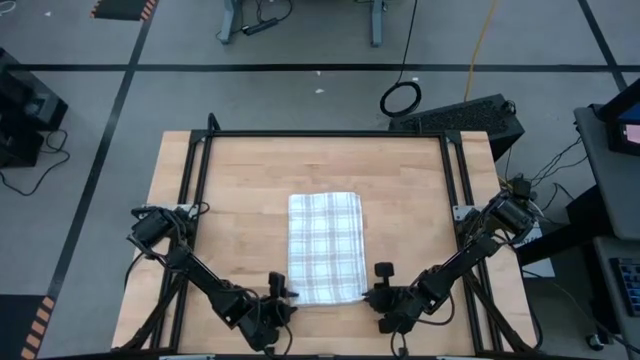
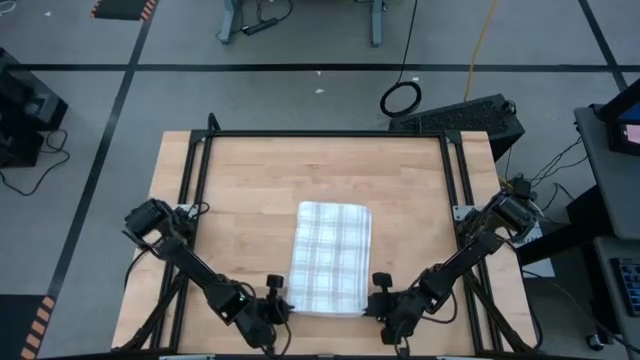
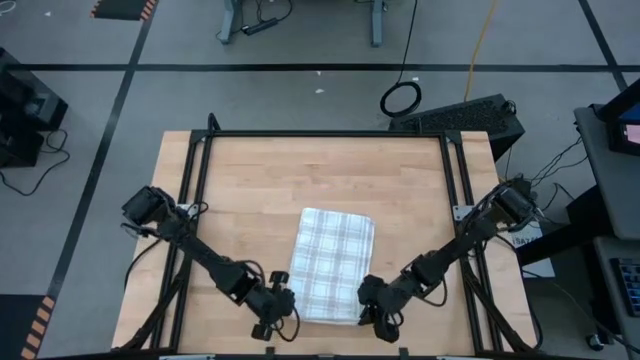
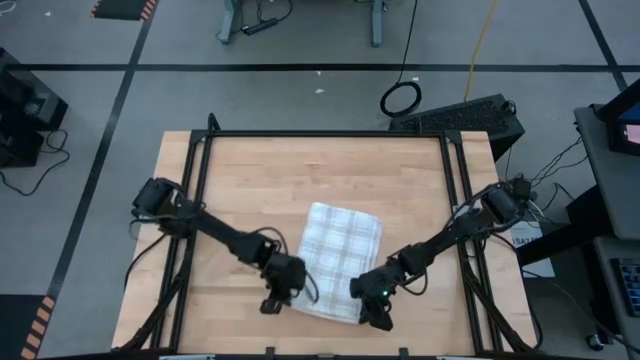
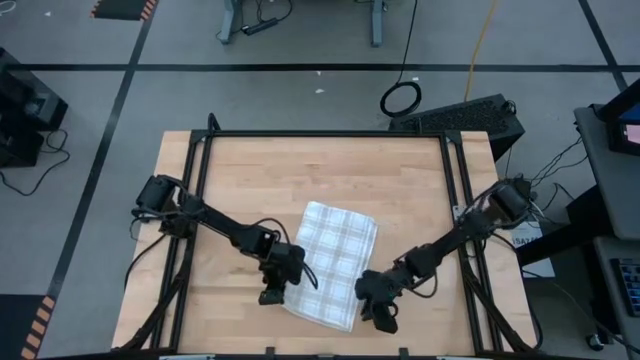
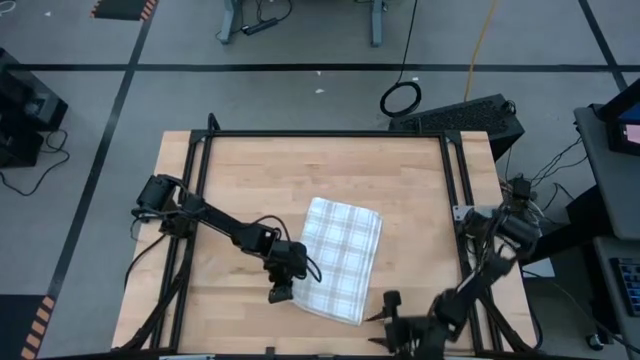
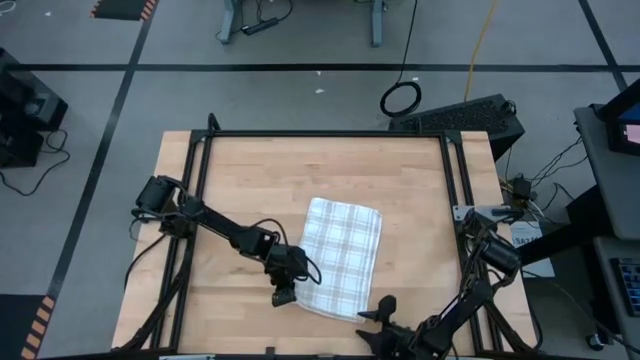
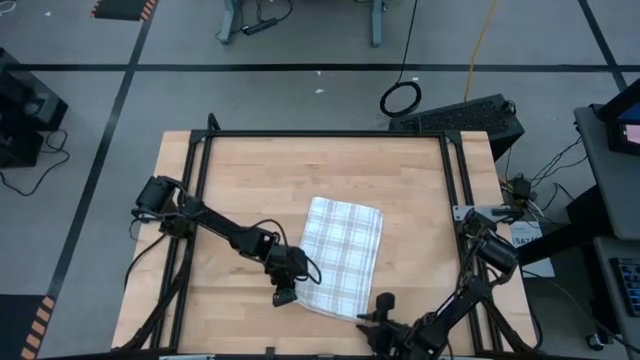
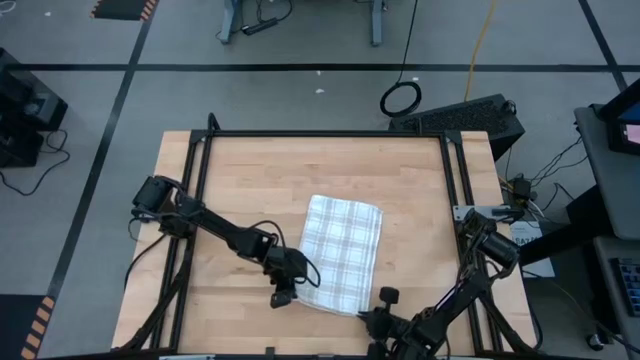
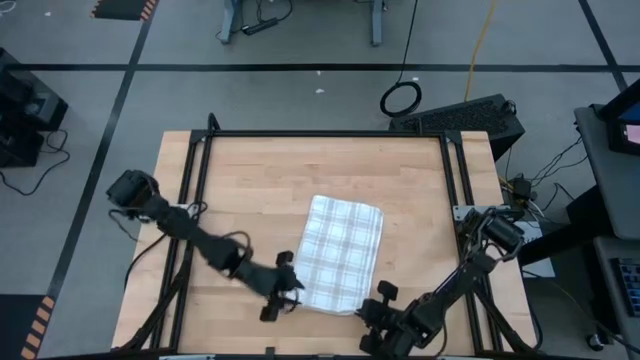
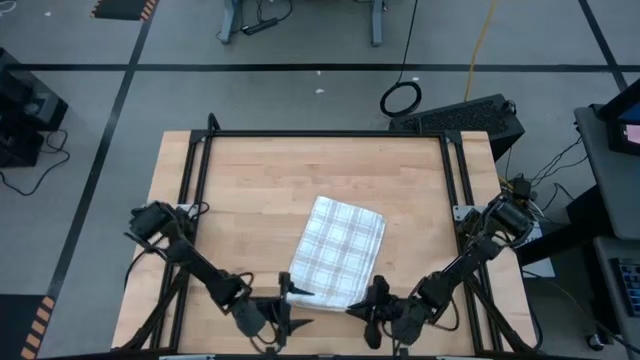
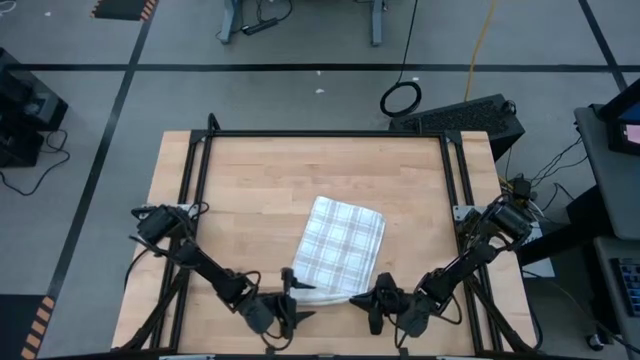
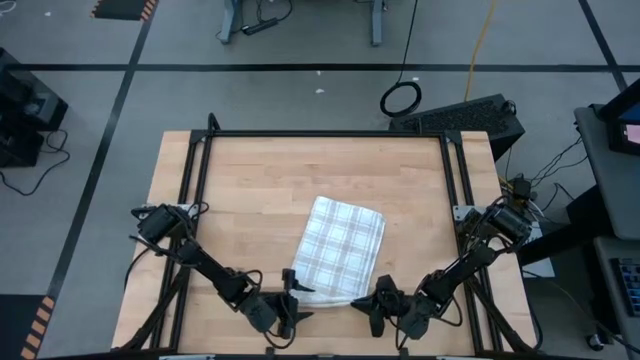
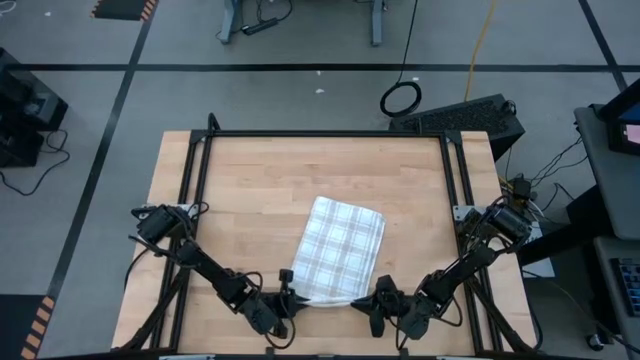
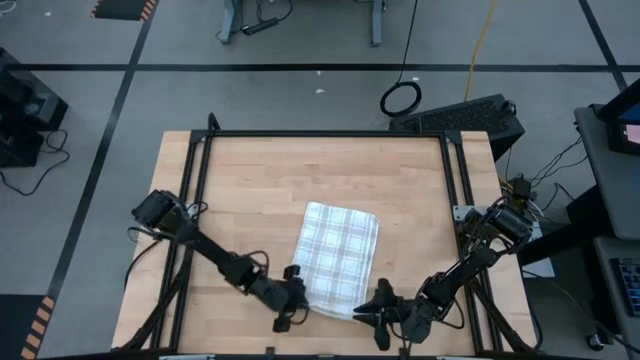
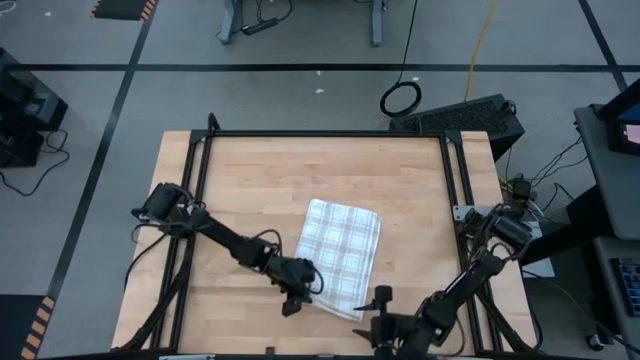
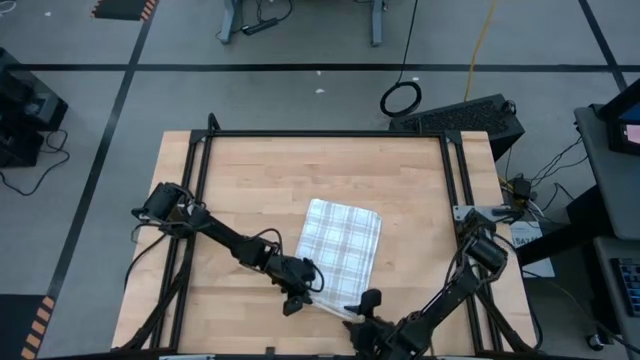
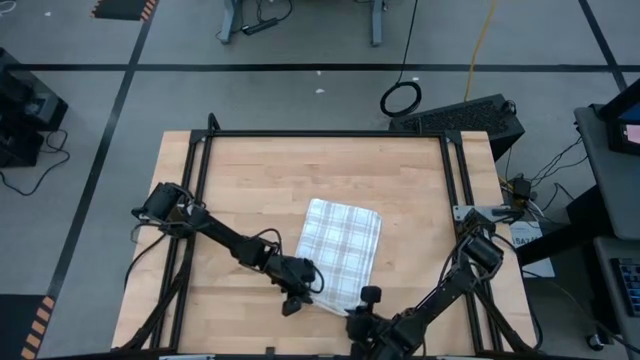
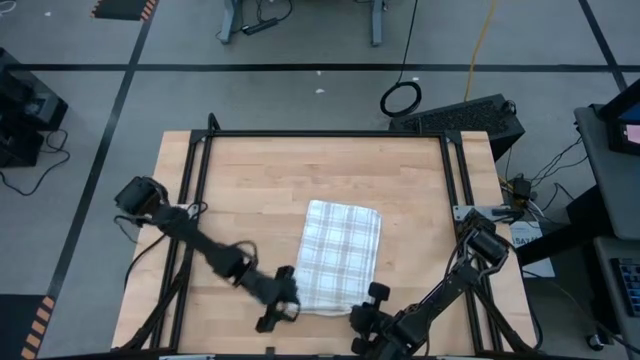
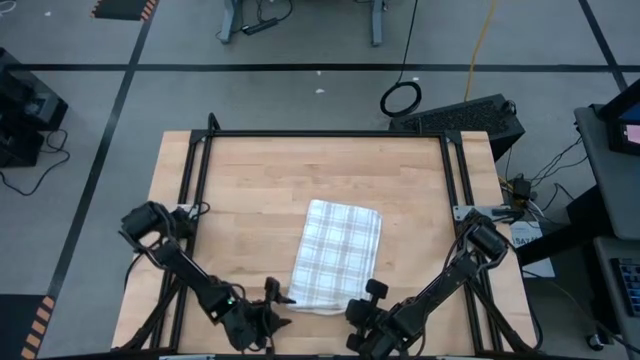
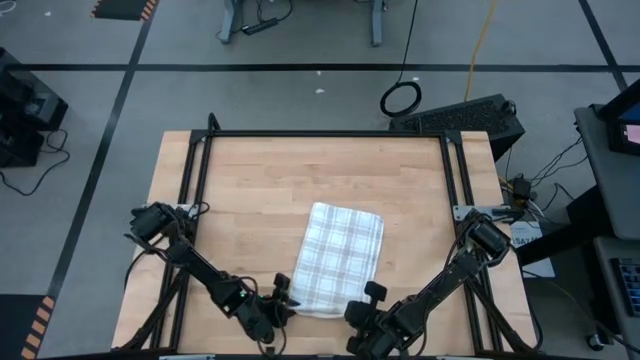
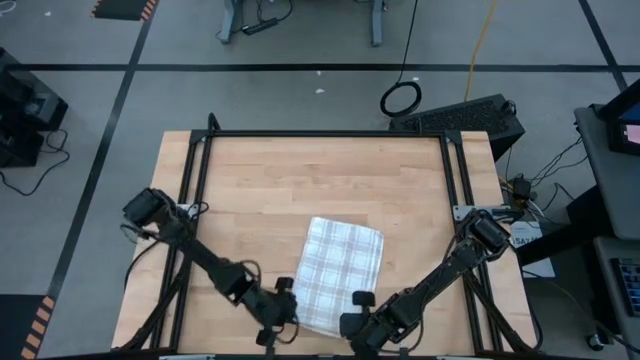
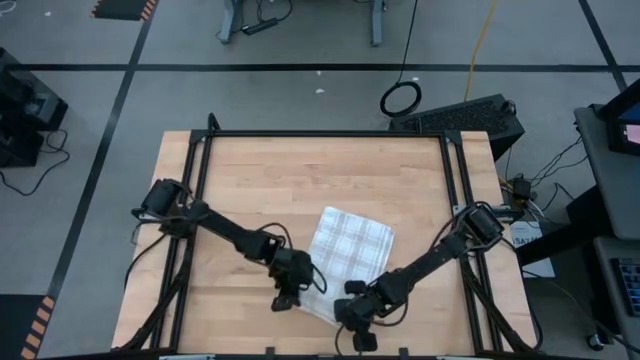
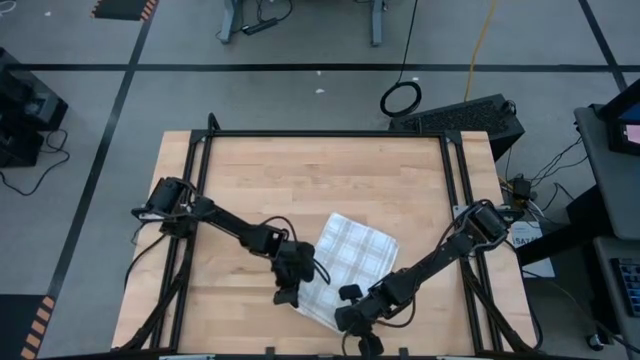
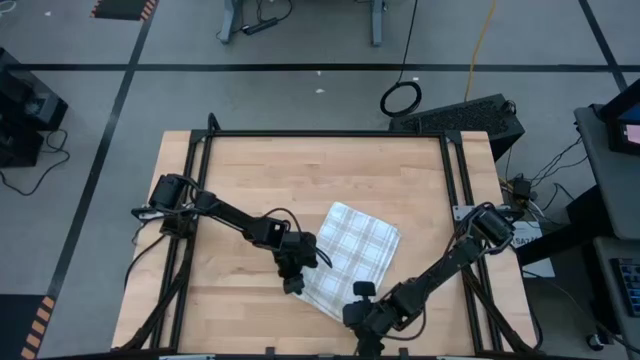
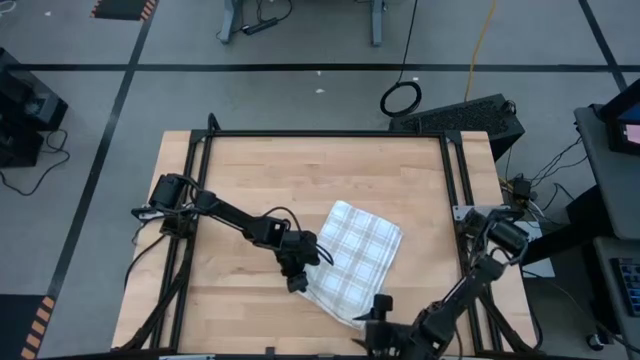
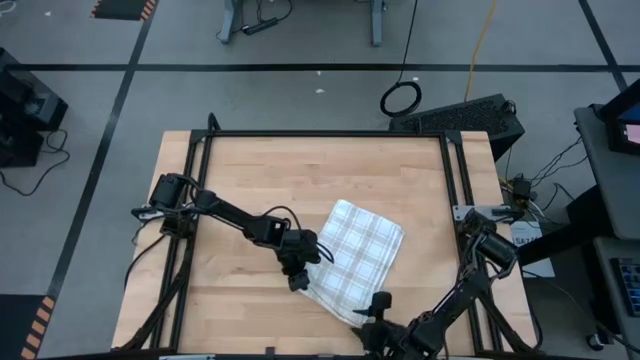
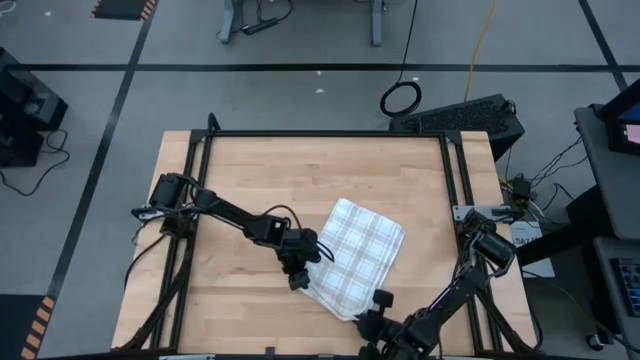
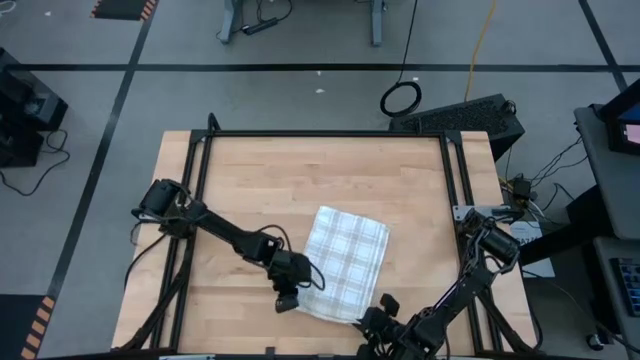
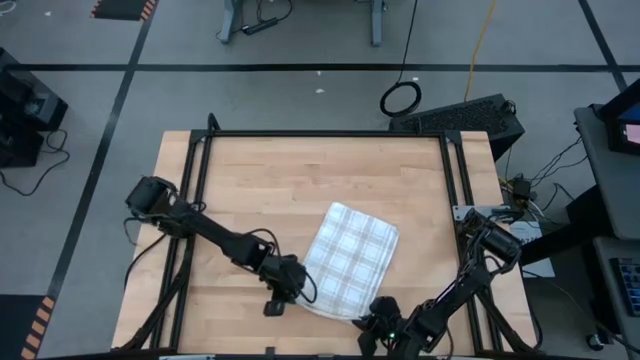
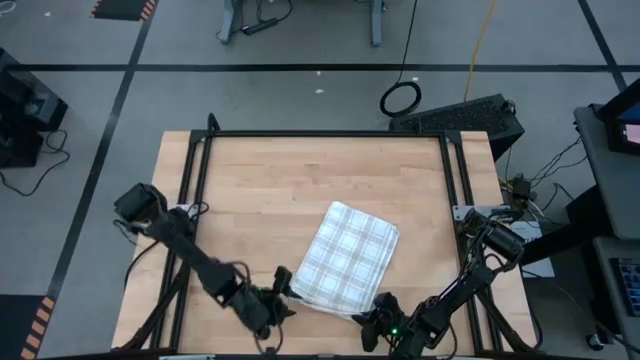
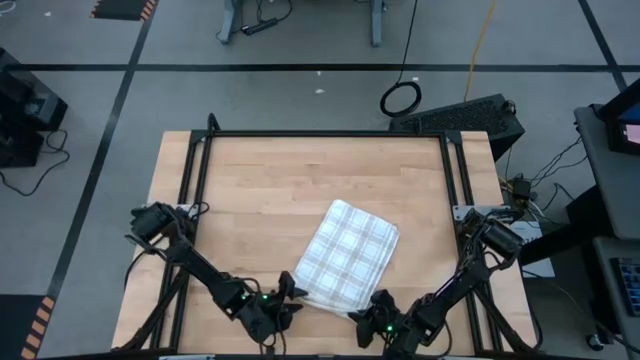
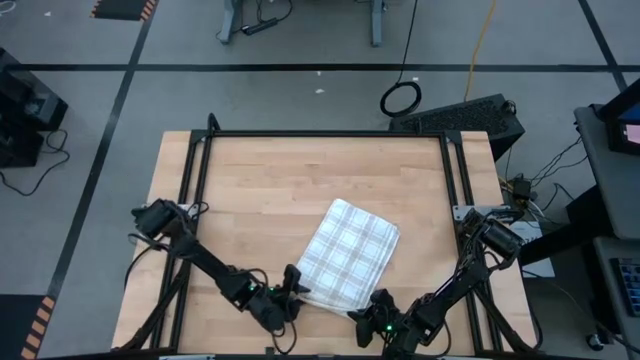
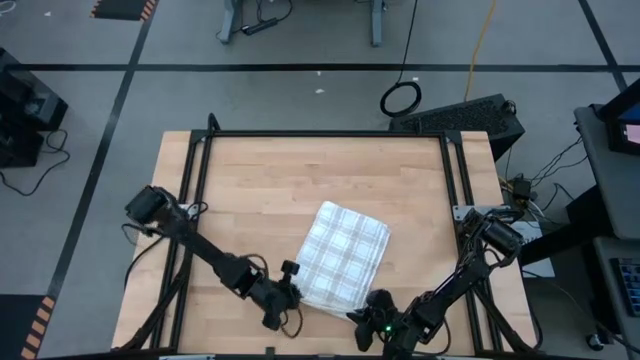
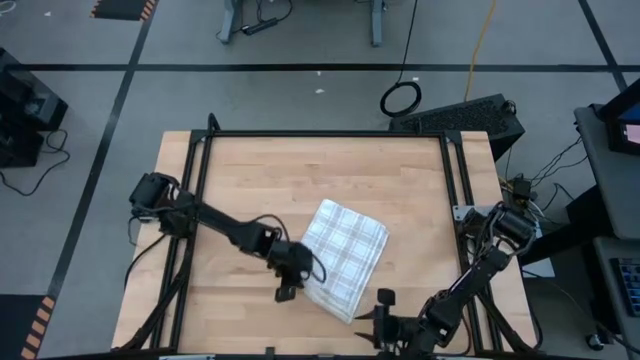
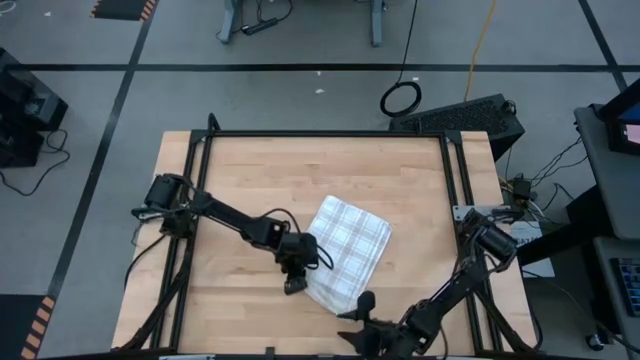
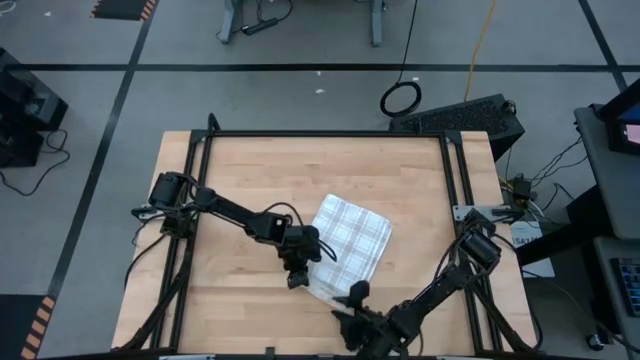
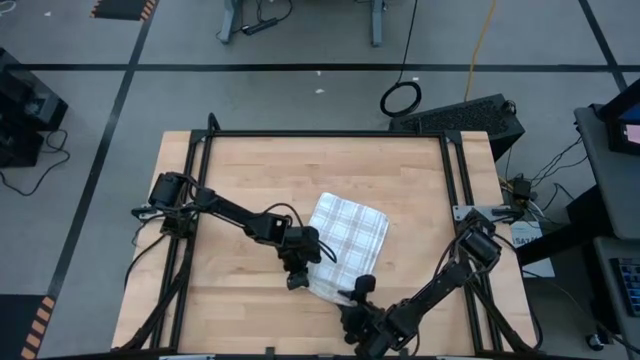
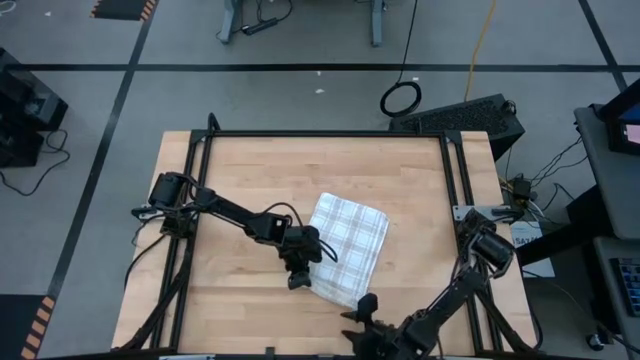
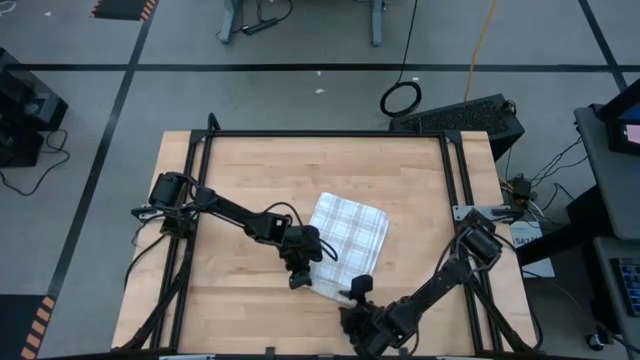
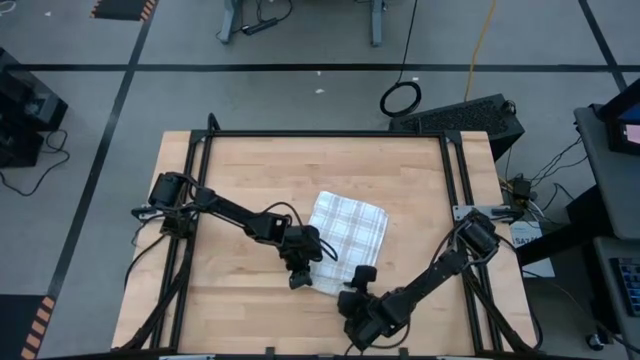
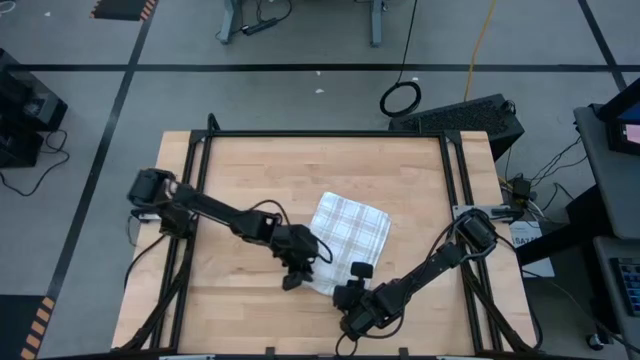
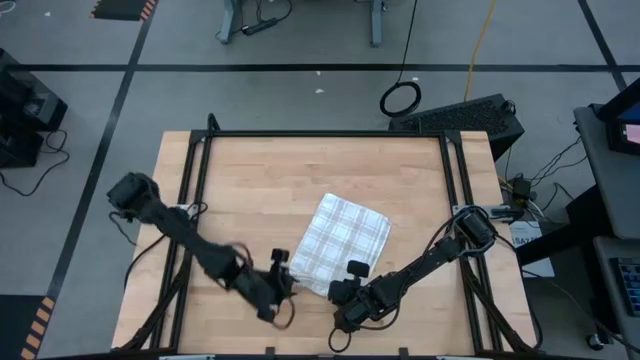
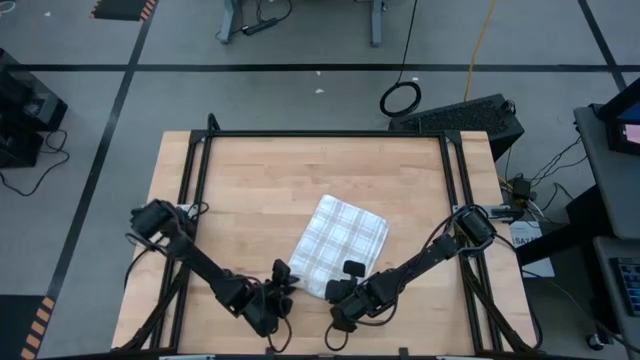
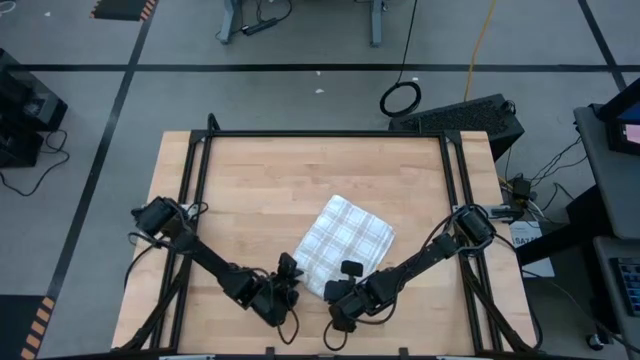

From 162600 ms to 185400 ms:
Task: Roll towel
Roll the towel
